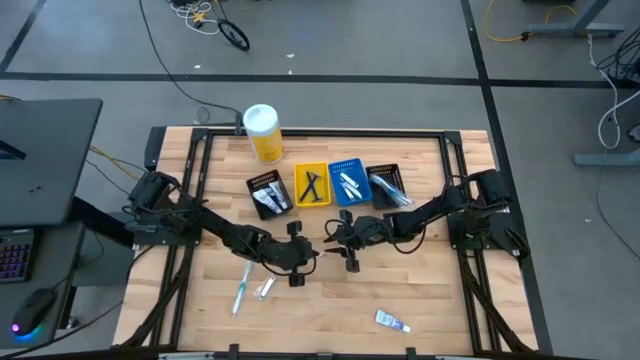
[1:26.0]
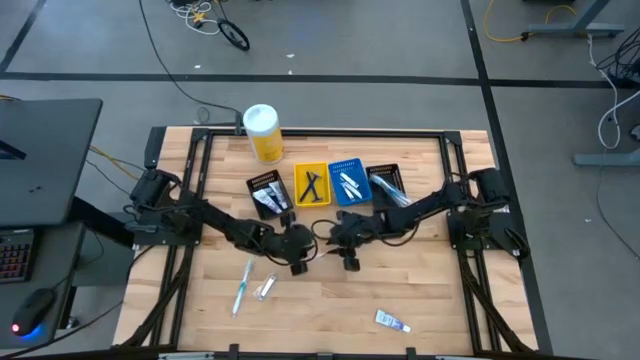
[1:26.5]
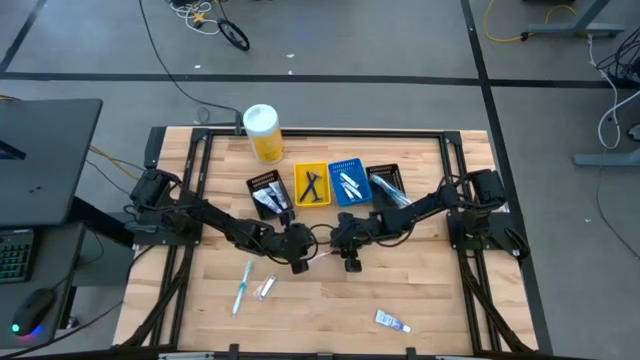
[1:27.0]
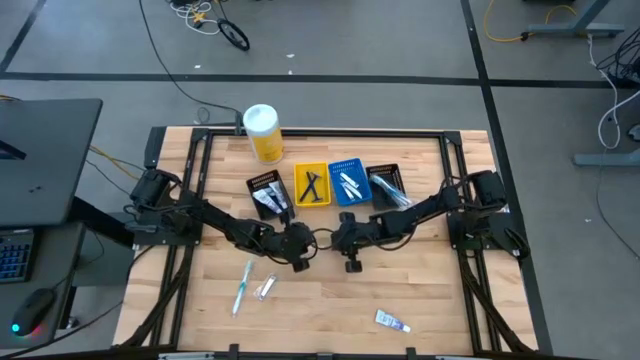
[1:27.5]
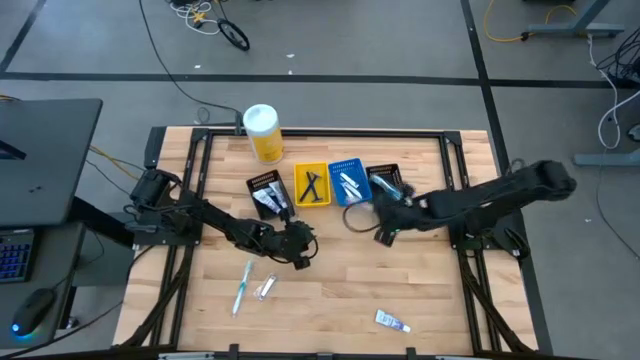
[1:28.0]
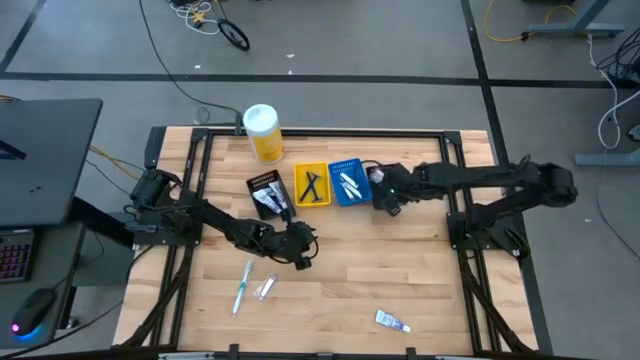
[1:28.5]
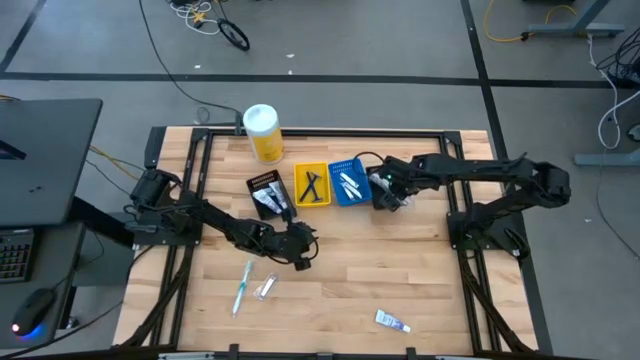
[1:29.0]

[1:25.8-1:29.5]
Task: Pick & Place Travel size toiletries
Put the orange toothbrush into the right black basket

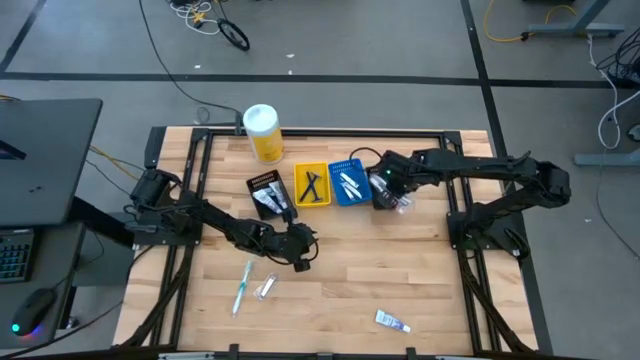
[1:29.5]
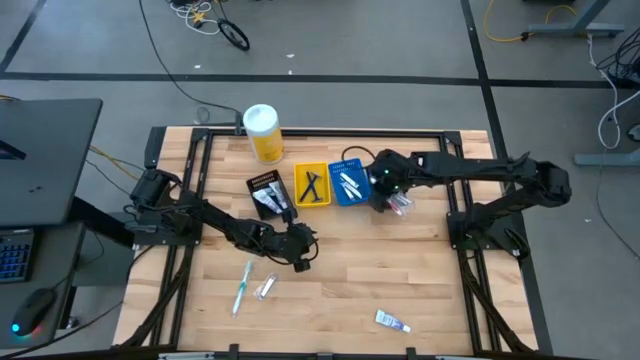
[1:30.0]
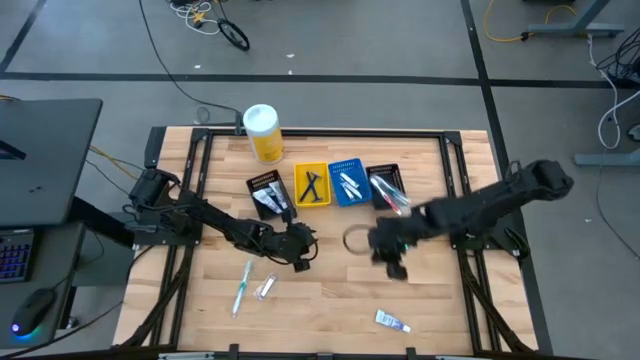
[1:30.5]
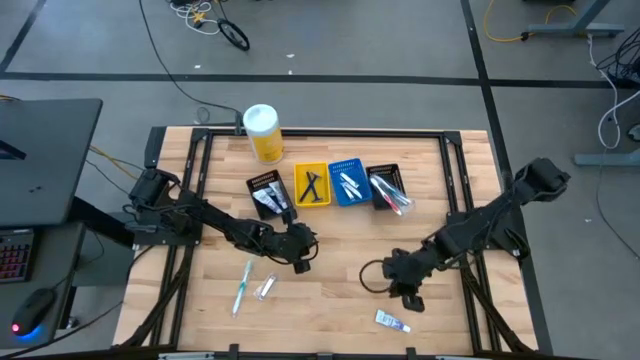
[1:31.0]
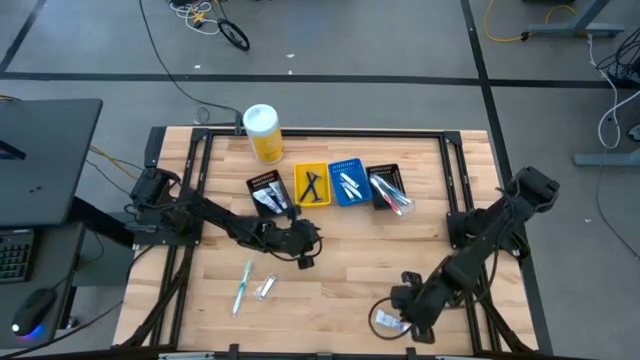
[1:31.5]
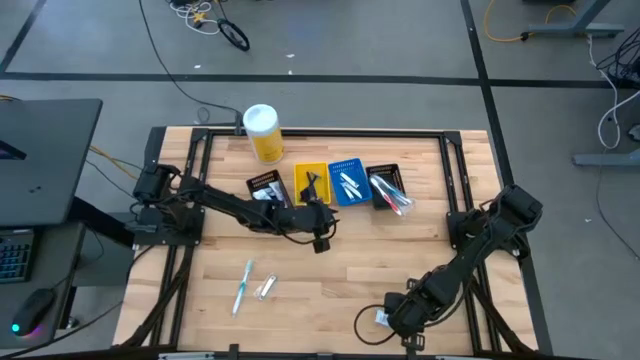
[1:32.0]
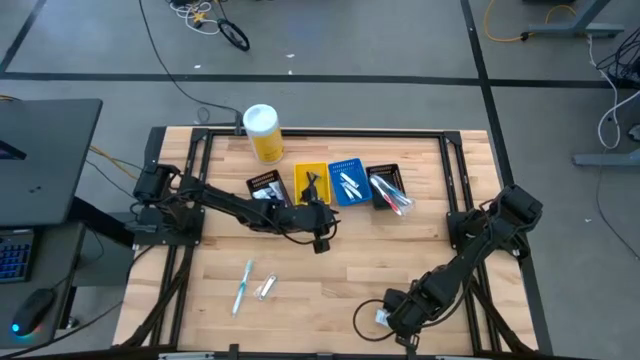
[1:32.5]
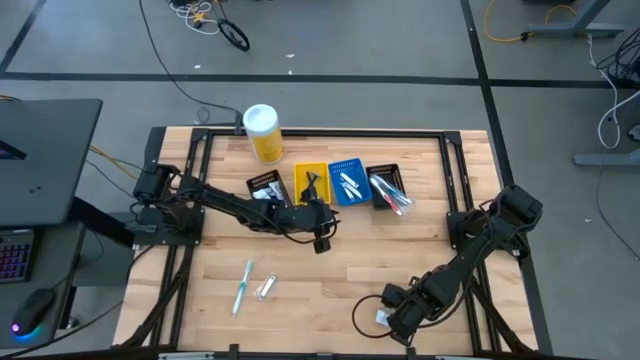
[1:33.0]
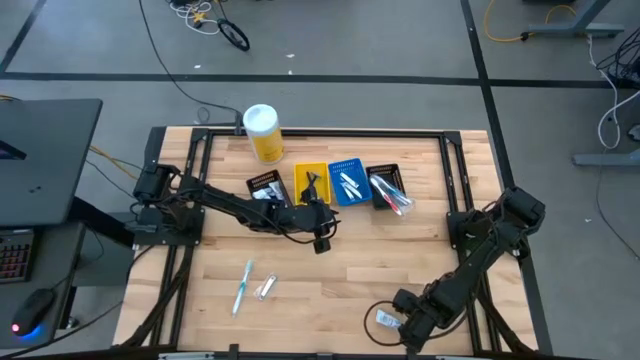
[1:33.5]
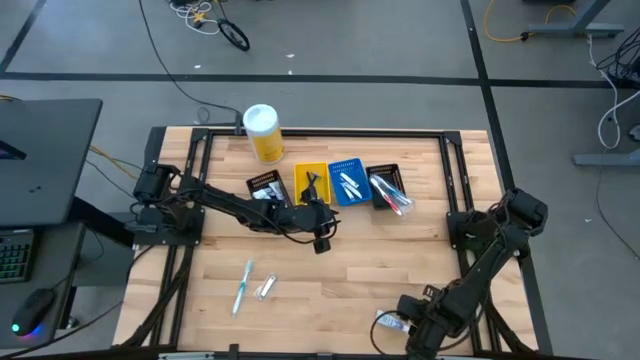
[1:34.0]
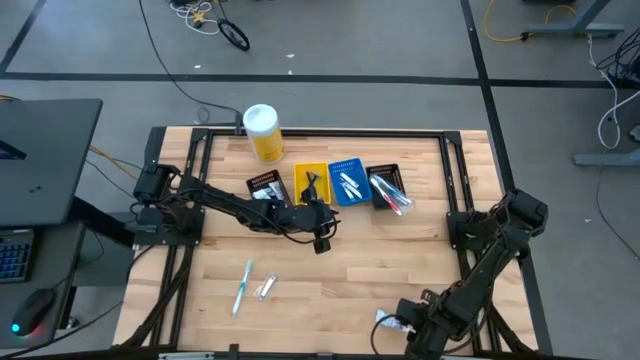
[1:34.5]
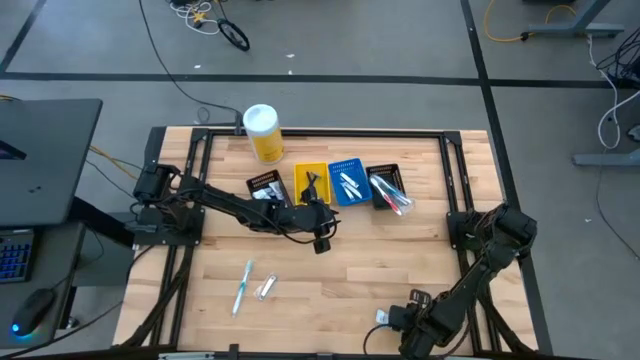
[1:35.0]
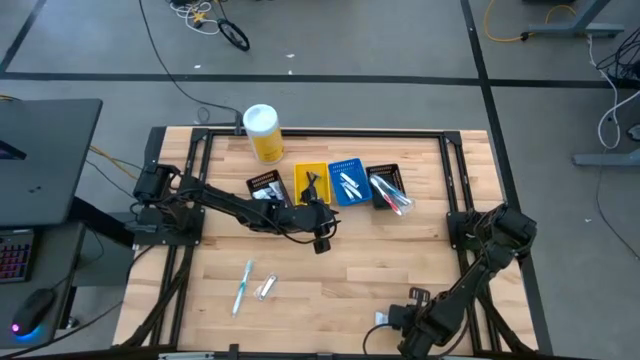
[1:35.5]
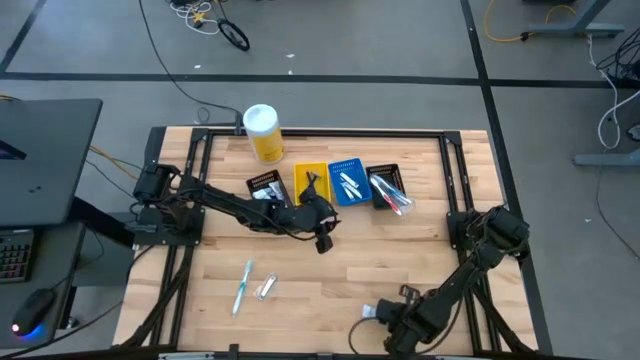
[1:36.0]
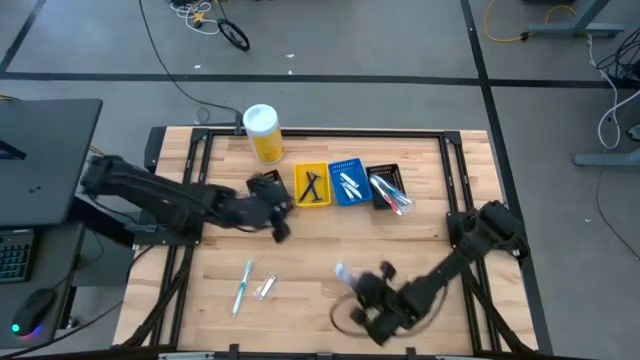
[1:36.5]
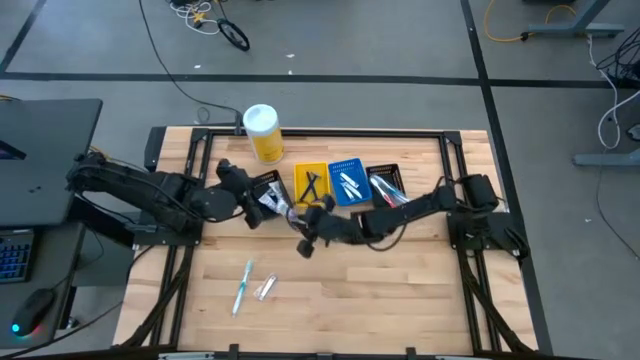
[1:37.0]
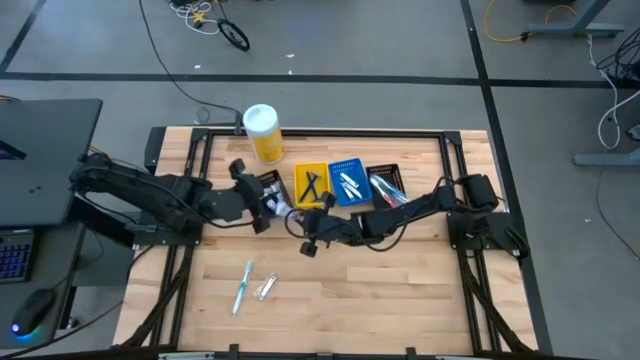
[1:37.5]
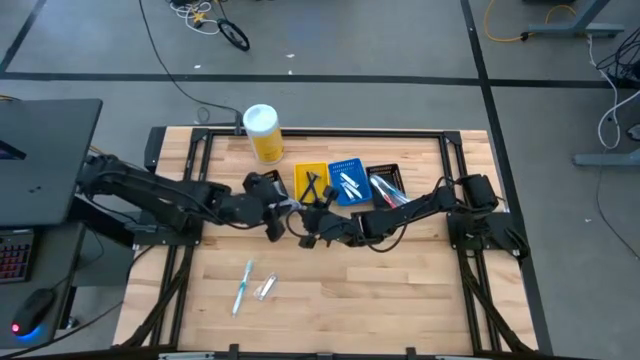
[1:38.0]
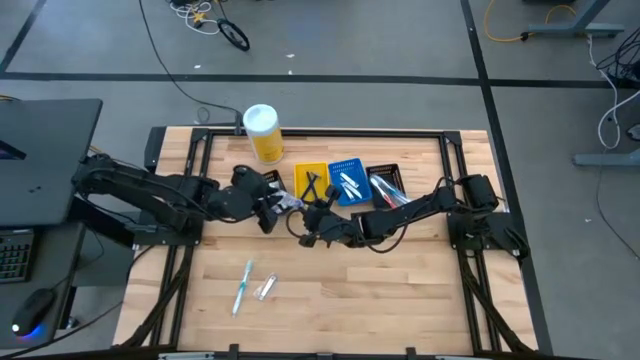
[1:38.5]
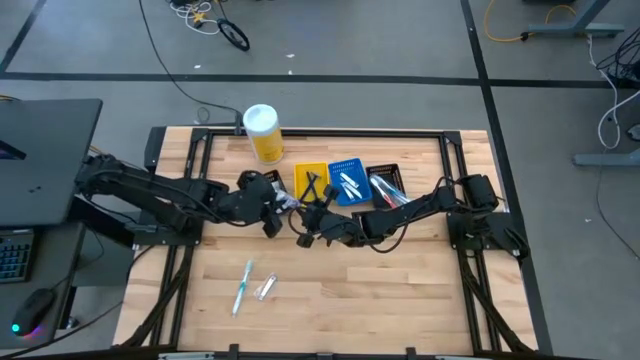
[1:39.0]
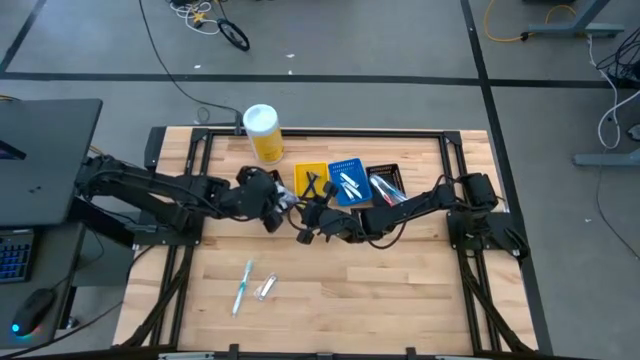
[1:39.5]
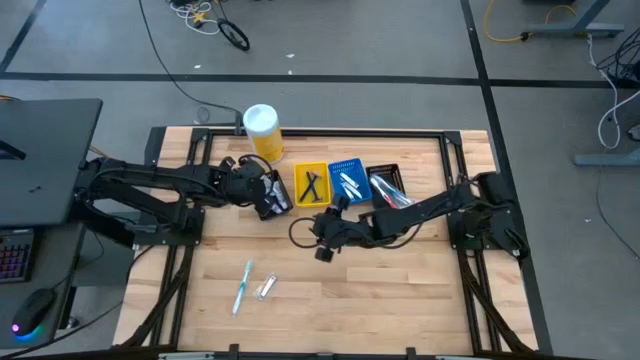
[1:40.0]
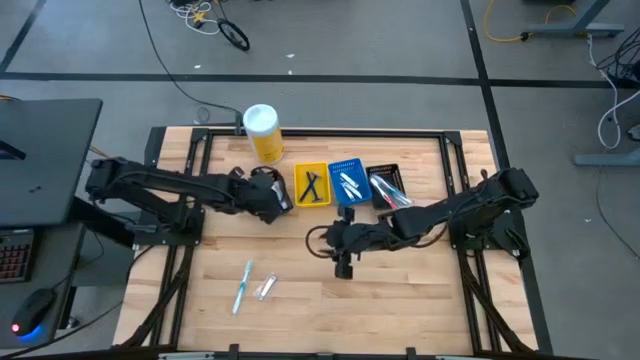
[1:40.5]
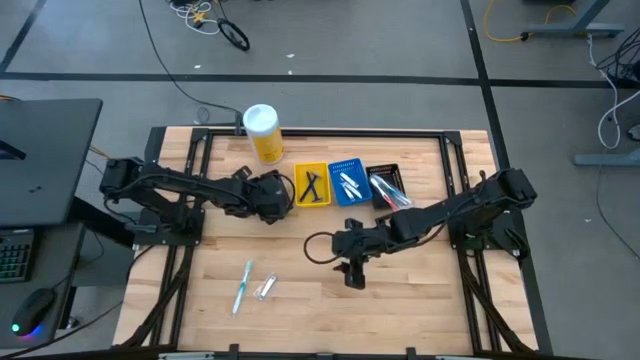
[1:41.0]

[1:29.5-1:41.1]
Put the white toothpaste into the left black basket

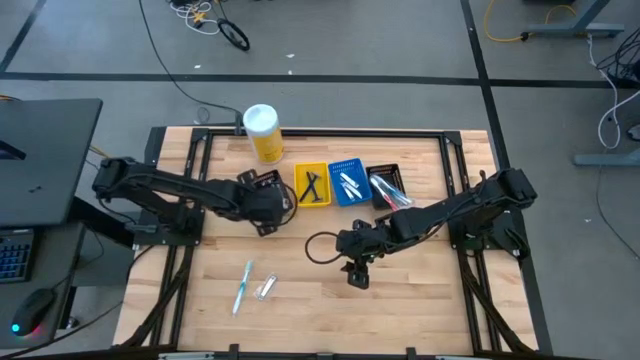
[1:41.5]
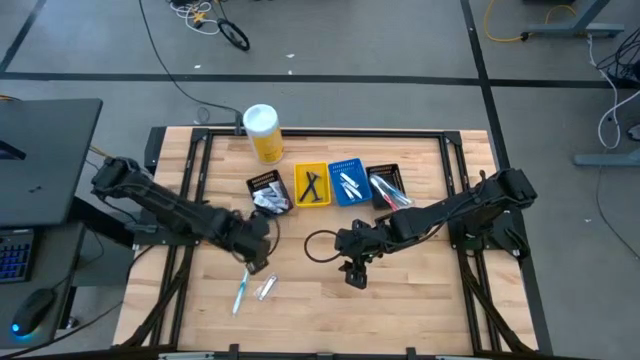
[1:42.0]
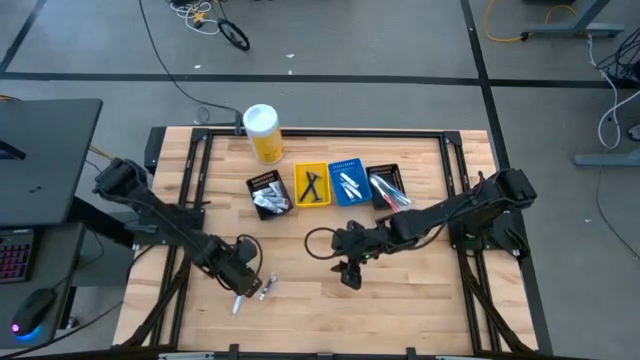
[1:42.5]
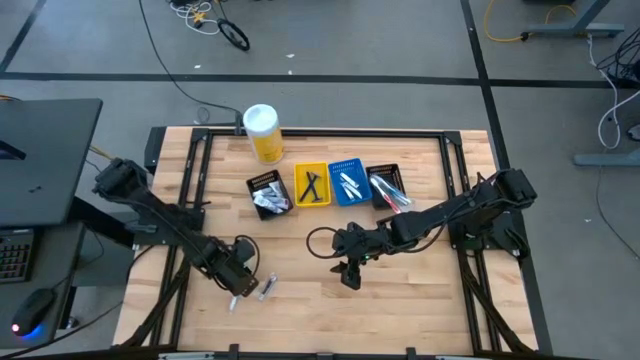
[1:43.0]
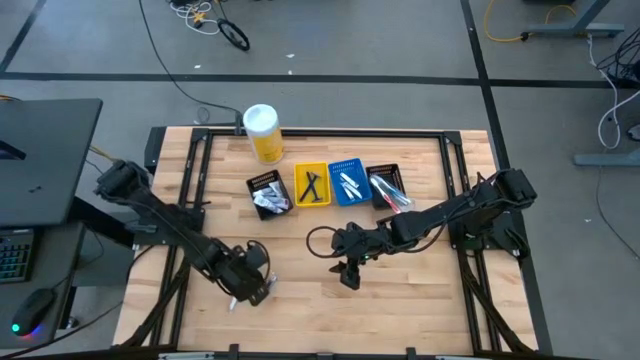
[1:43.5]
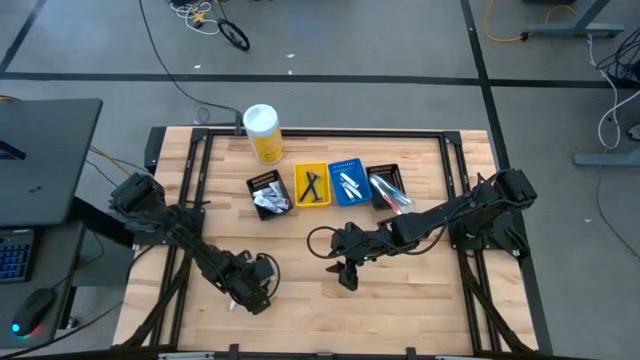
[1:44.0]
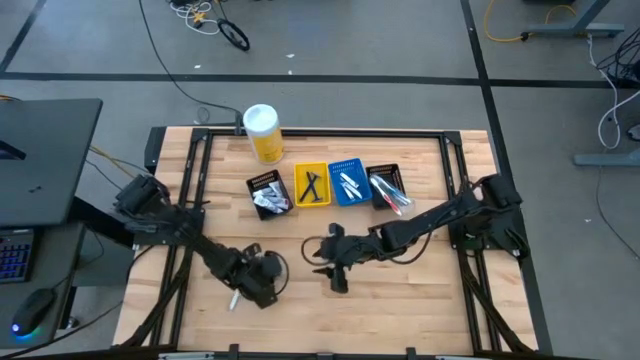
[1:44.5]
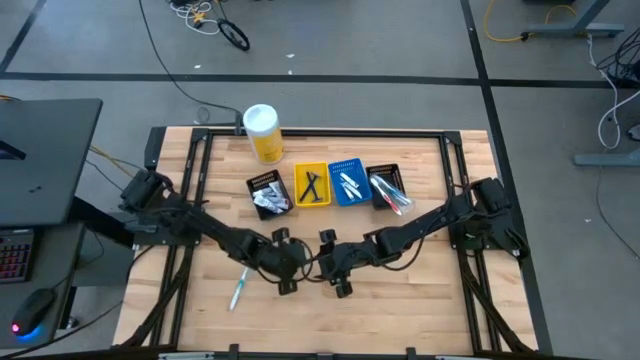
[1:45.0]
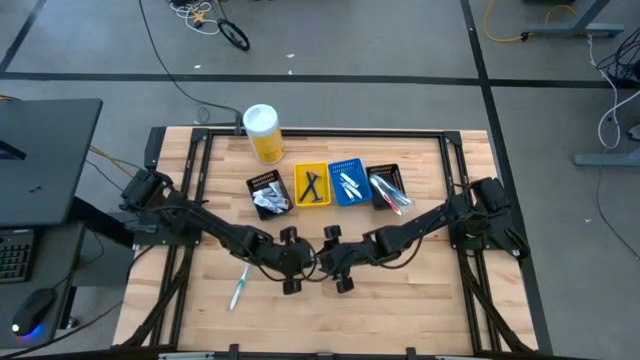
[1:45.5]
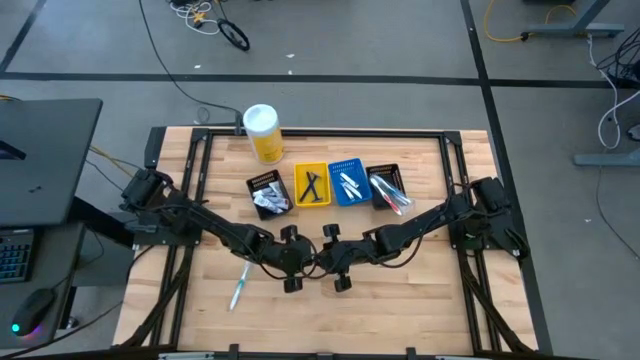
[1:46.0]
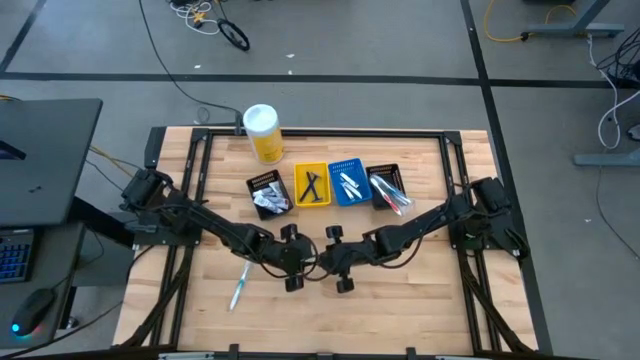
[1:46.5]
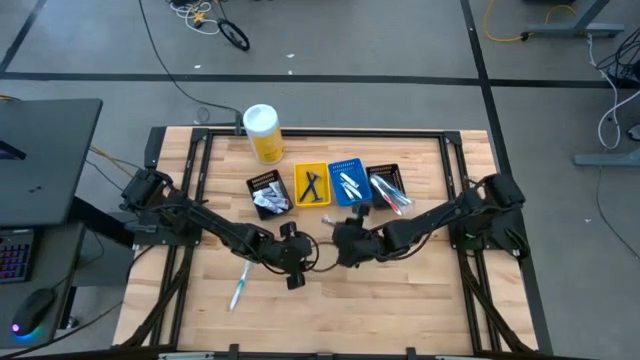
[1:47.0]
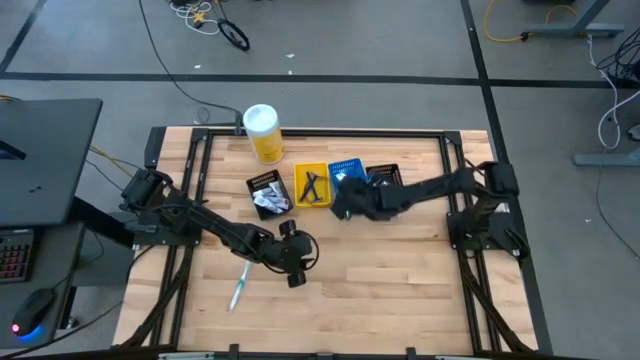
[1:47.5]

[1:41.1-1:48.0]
Put the silver nail cutter into the blue basket
